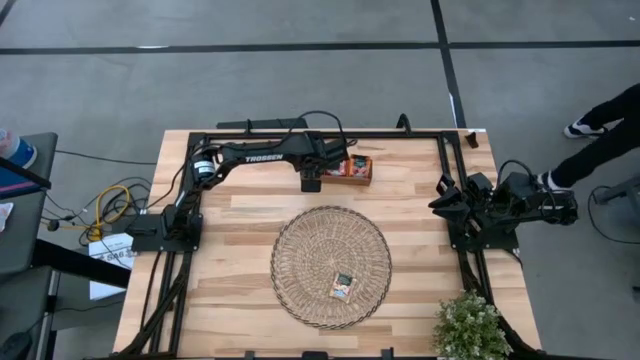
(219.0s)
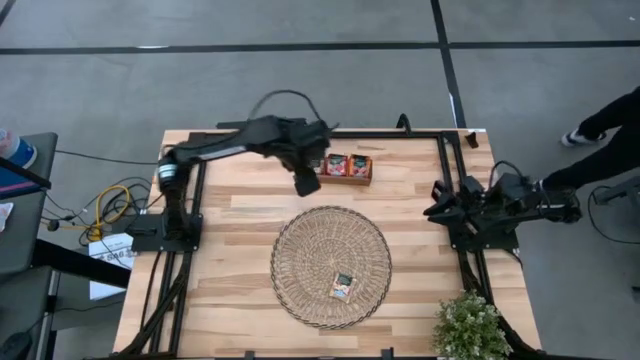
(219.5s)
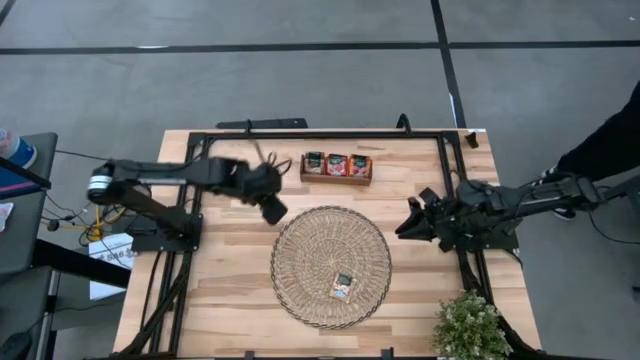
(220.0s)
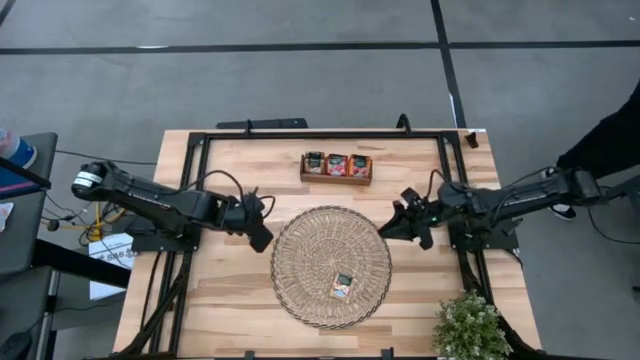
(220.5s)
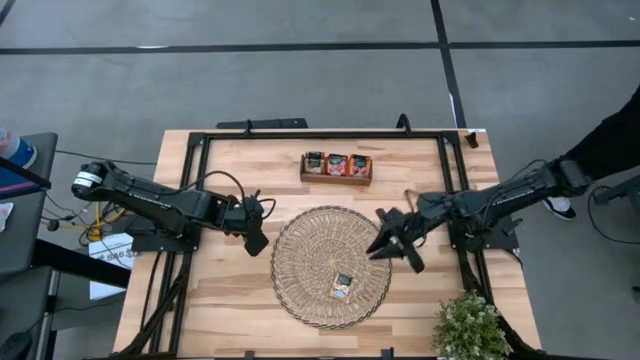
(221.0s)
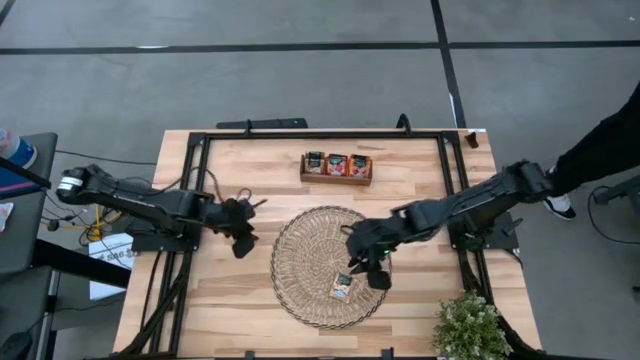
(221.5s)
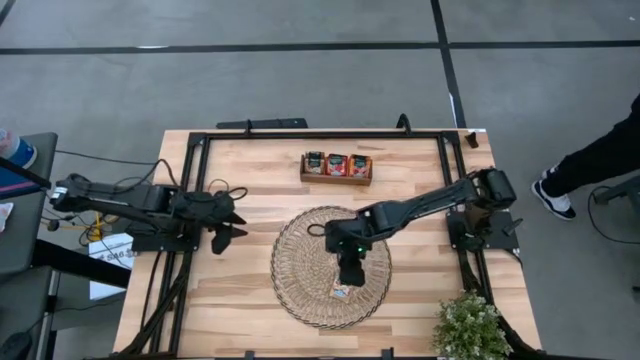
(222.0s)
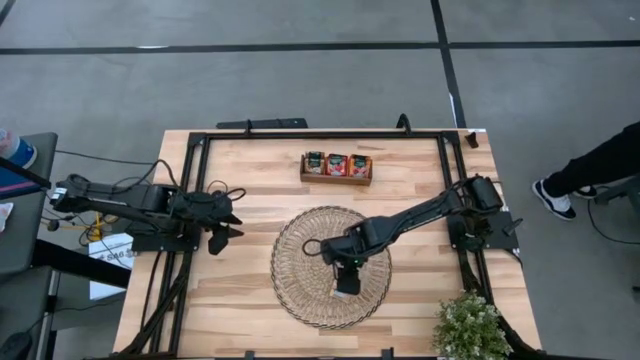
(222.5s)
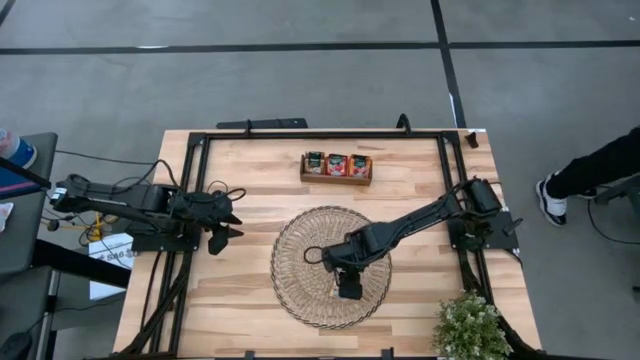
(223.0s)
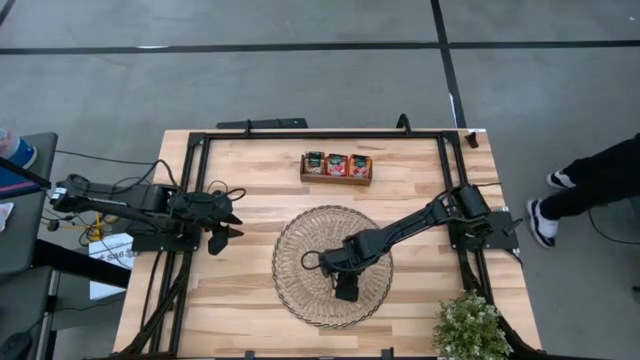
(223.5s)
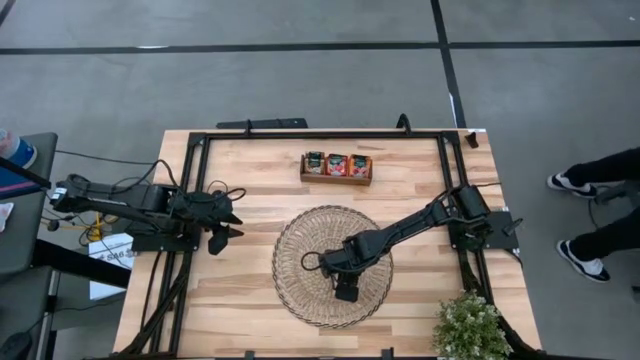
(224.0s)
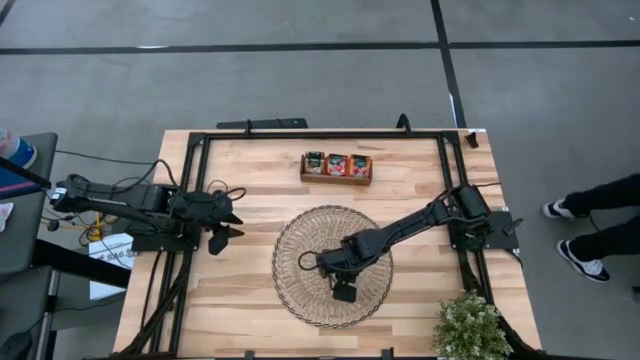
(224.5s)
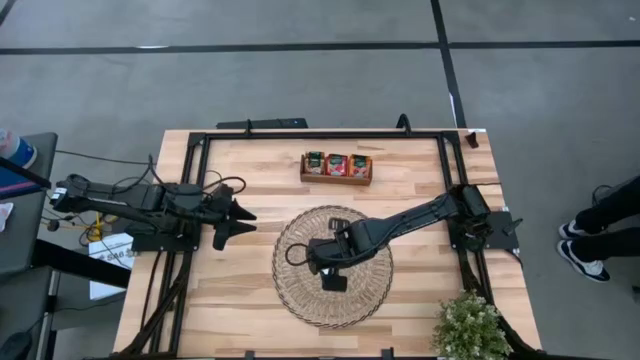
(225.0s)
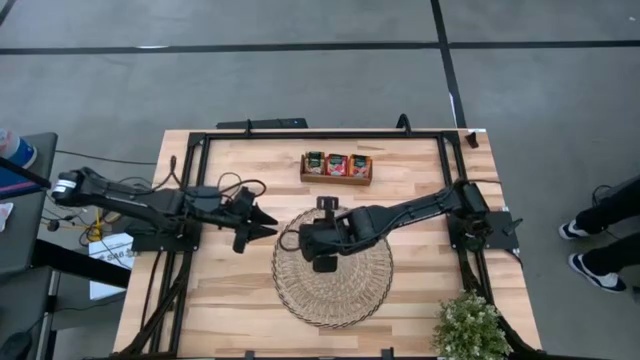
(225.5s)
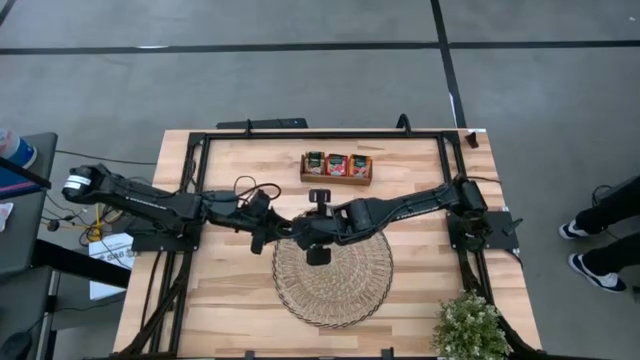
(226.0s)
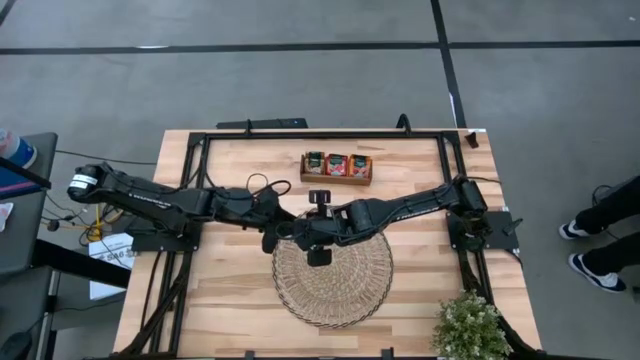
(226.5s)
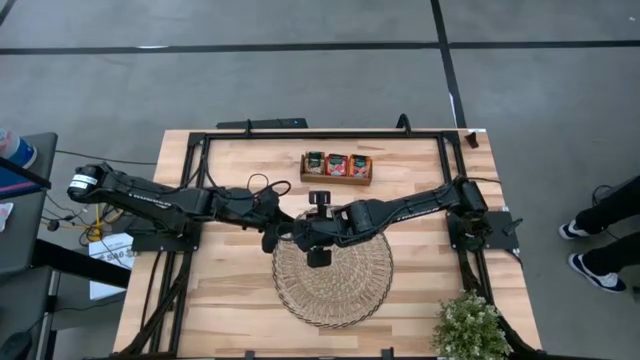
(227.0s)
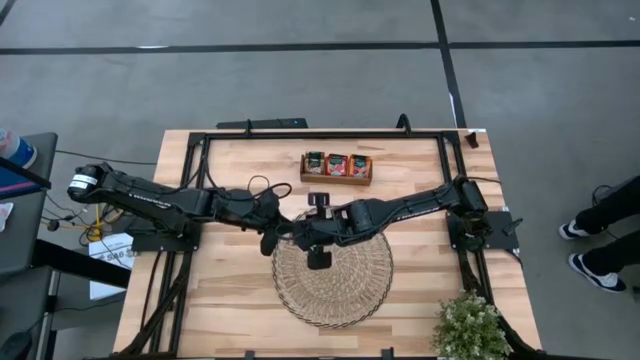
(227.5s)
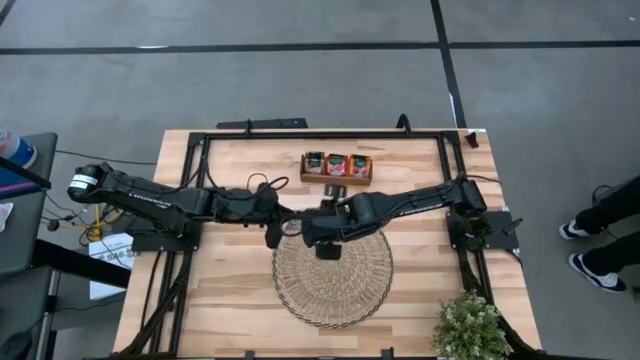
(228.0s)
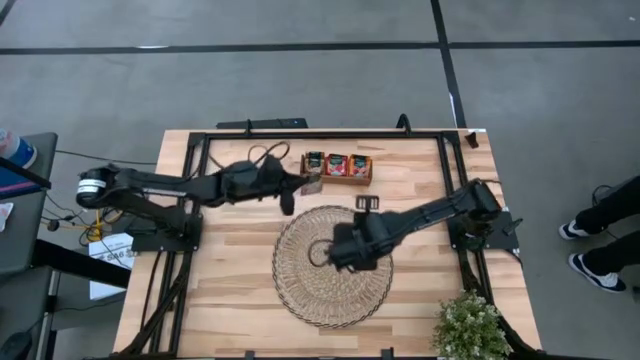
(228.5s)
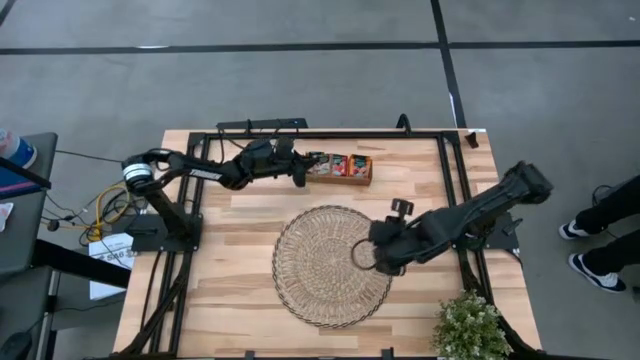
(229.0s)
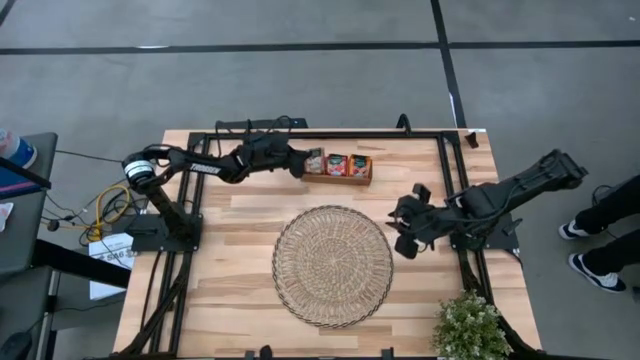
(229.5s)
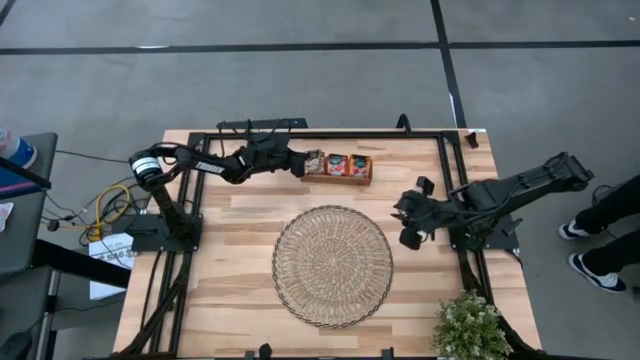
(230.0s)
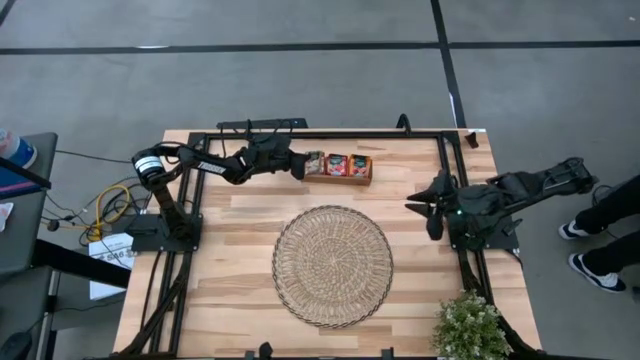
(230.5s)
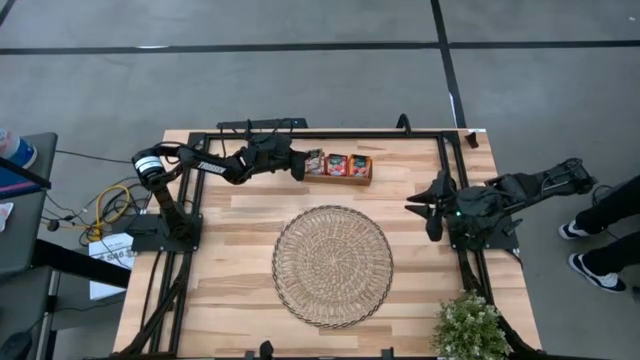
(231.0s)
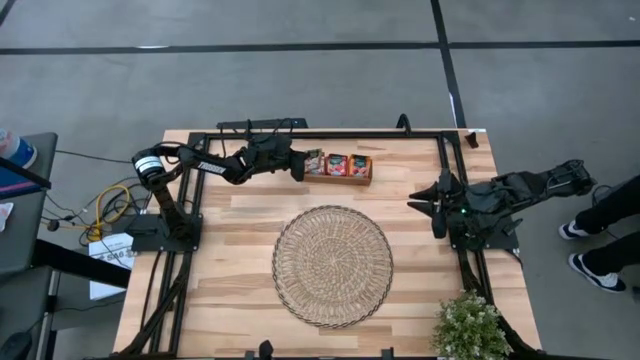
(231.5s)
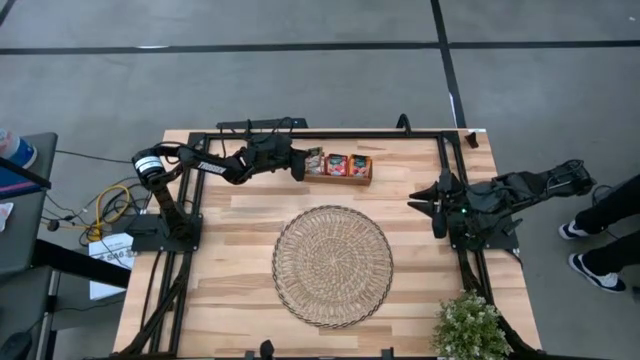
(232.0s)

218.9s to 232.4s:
Task: Pick & Place Tea
Put the brown tea bag into the left section of the wooden organizer

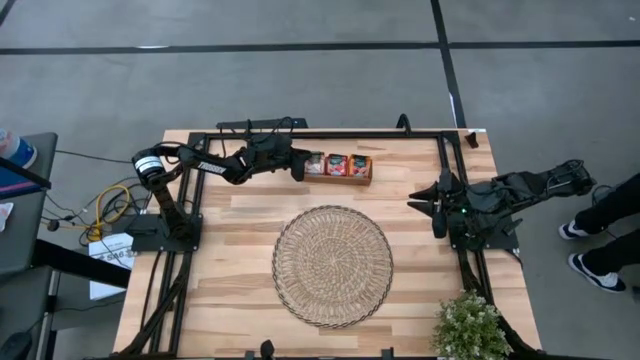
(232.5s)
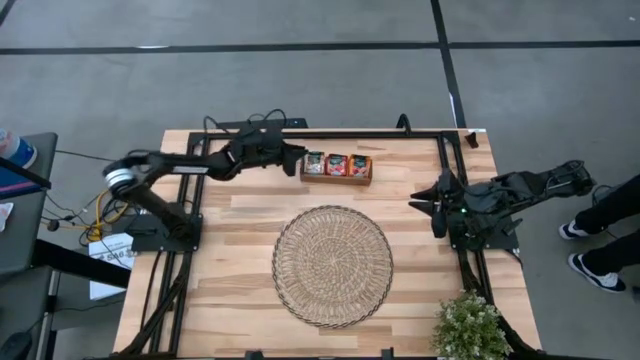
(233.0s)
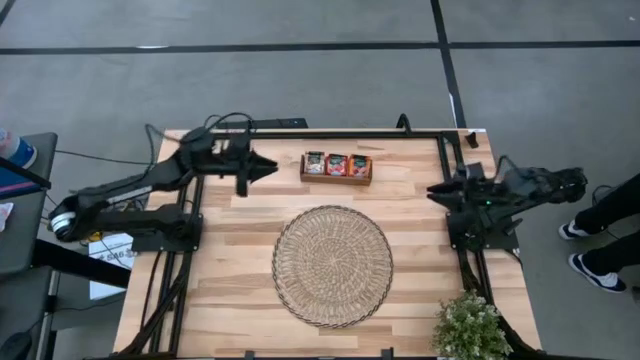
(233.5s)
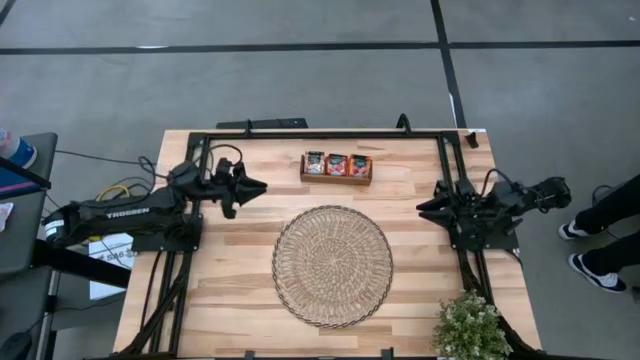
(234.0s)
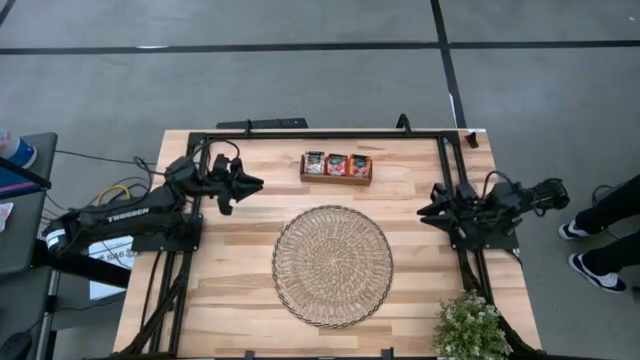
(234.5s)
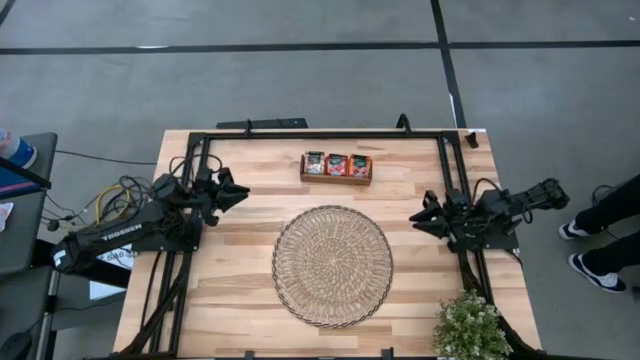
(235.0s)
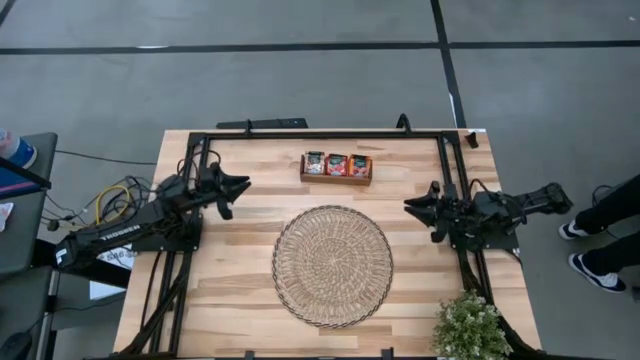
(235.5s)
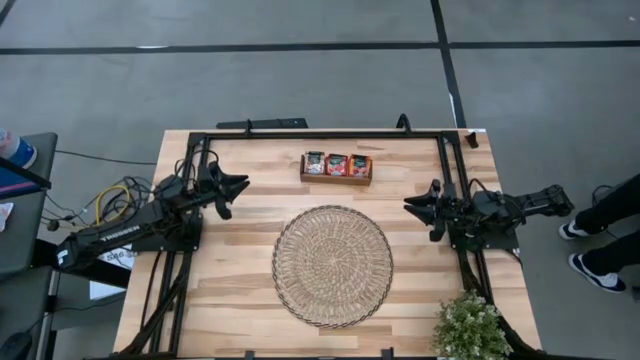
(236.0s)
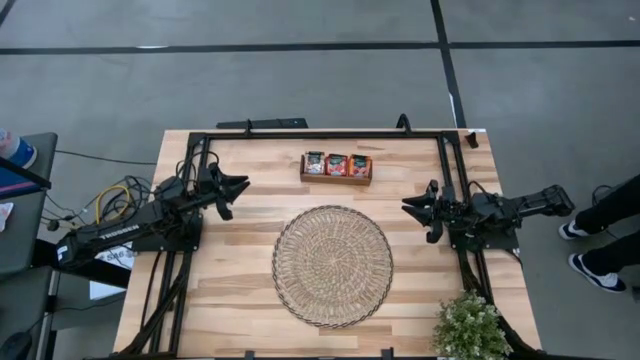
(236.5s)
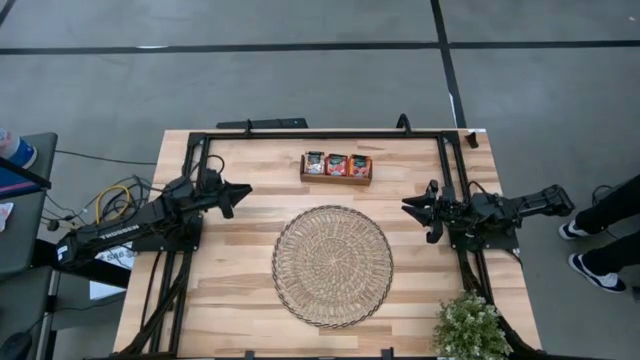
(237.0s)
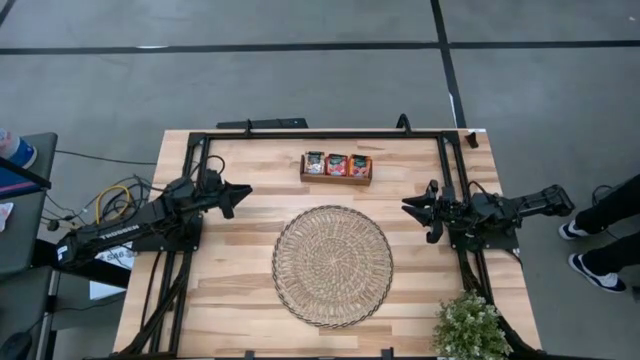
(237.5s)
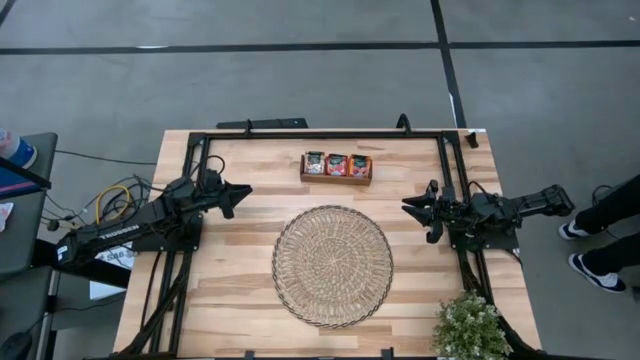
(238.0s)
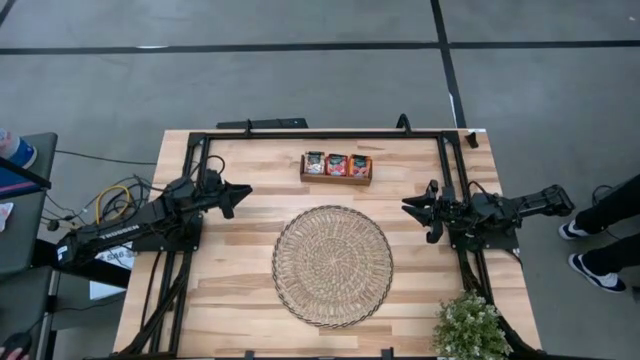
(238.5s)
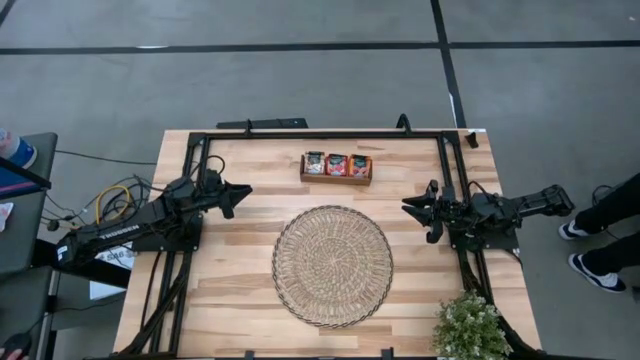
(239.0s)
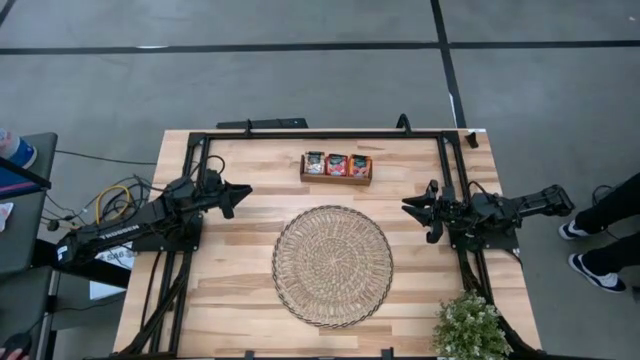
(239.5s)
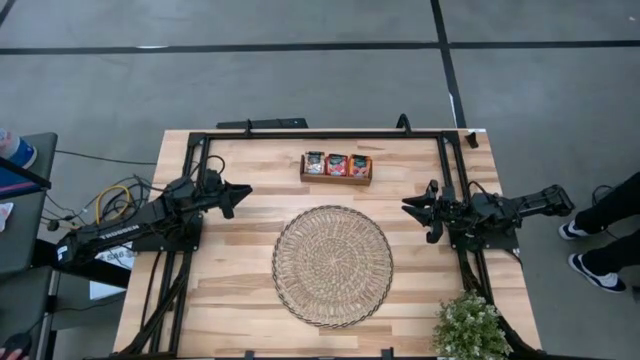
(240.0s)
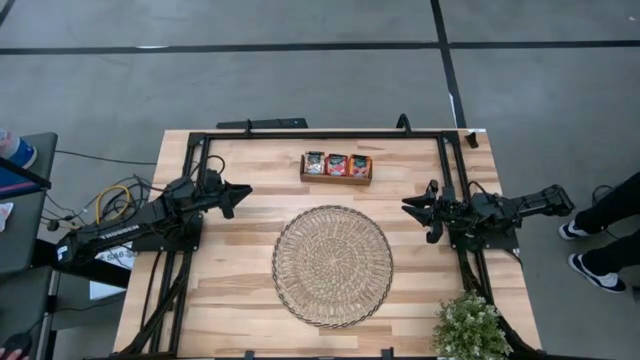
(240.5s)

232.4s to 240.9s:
Return to Home Position
